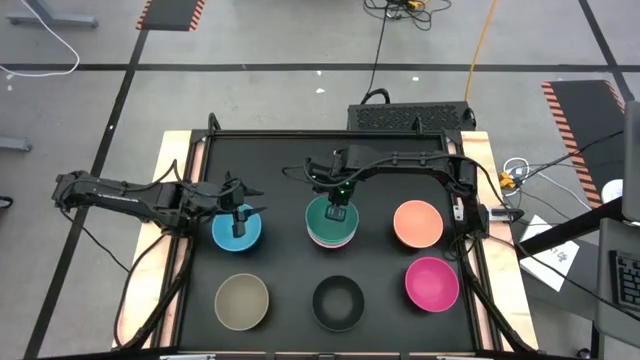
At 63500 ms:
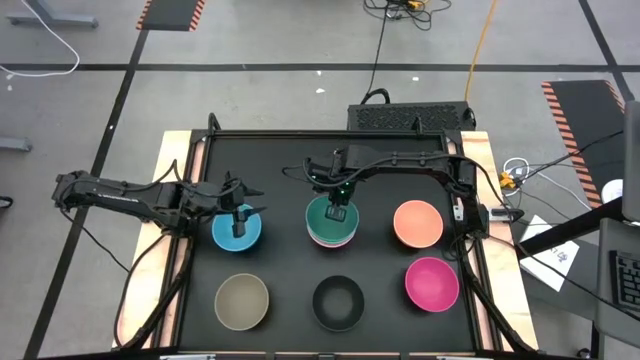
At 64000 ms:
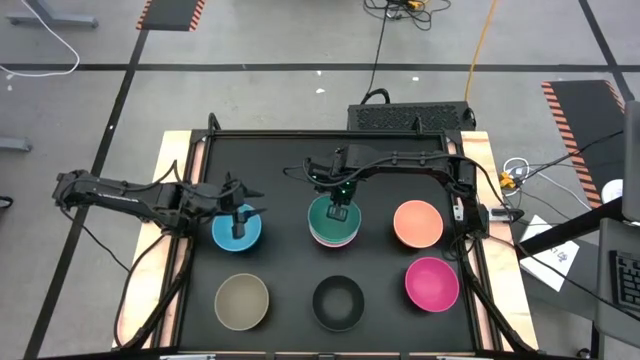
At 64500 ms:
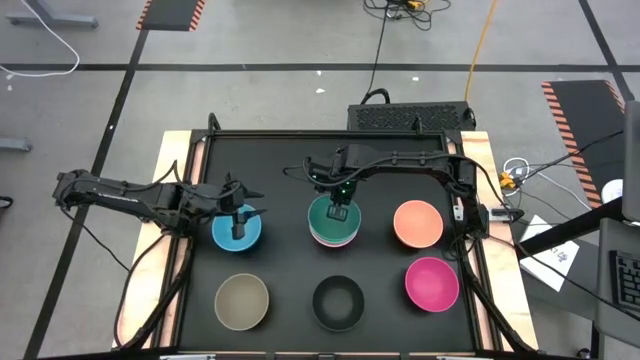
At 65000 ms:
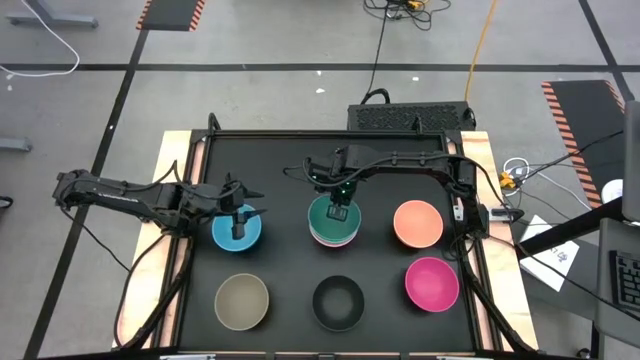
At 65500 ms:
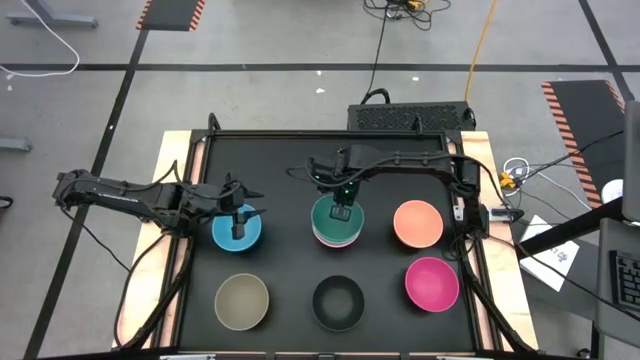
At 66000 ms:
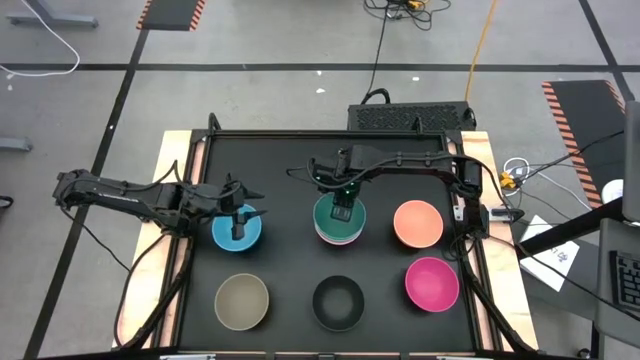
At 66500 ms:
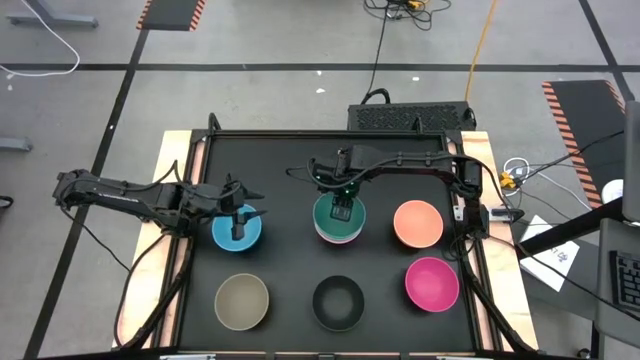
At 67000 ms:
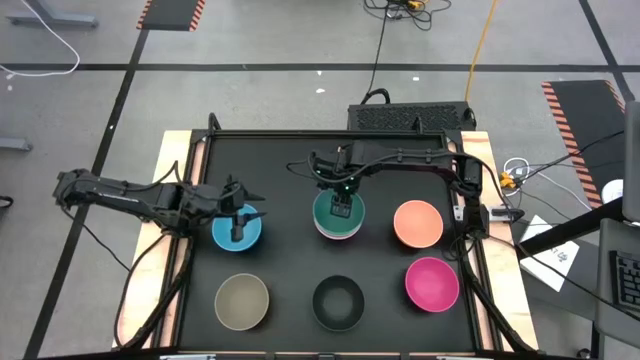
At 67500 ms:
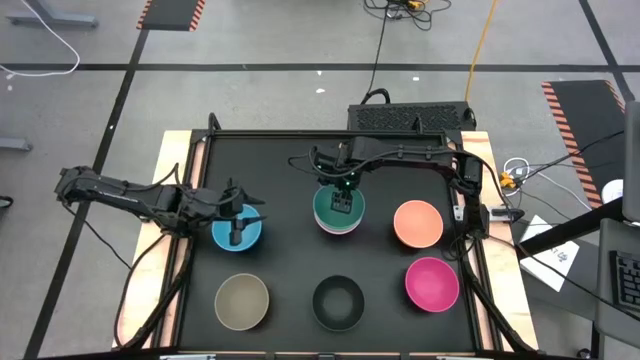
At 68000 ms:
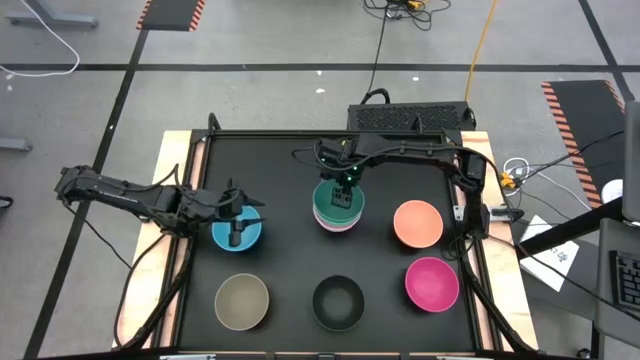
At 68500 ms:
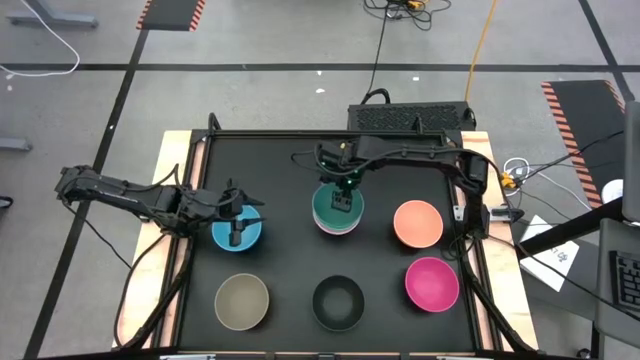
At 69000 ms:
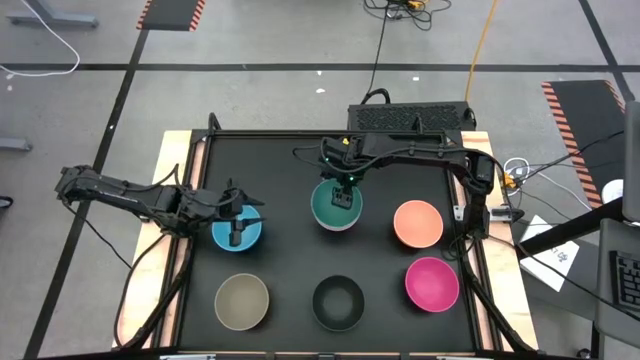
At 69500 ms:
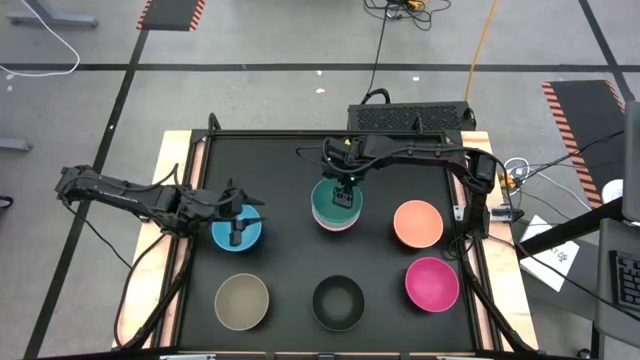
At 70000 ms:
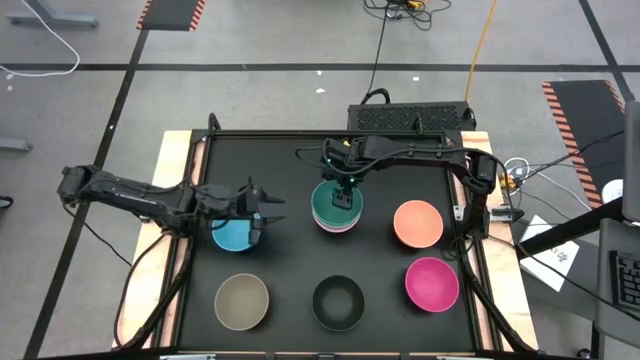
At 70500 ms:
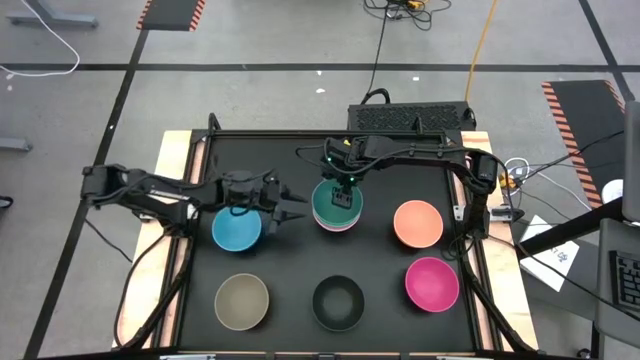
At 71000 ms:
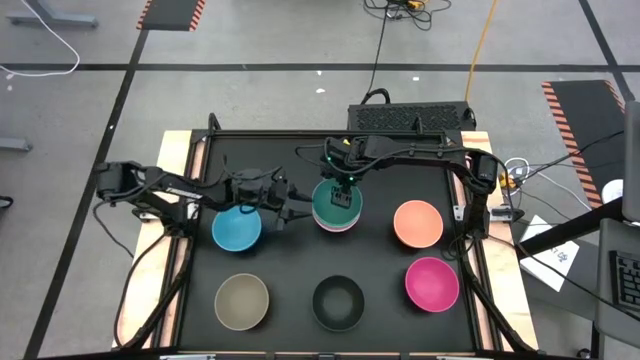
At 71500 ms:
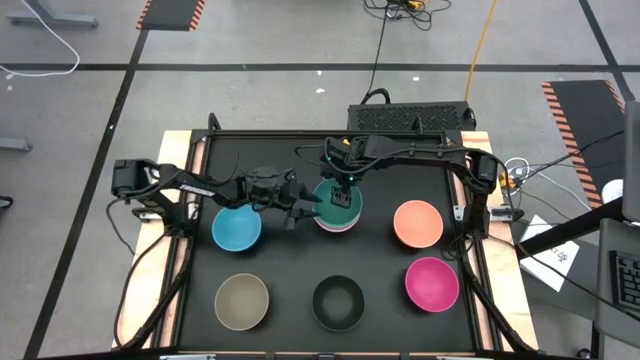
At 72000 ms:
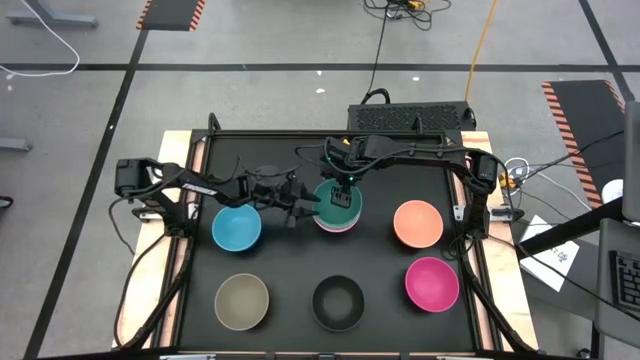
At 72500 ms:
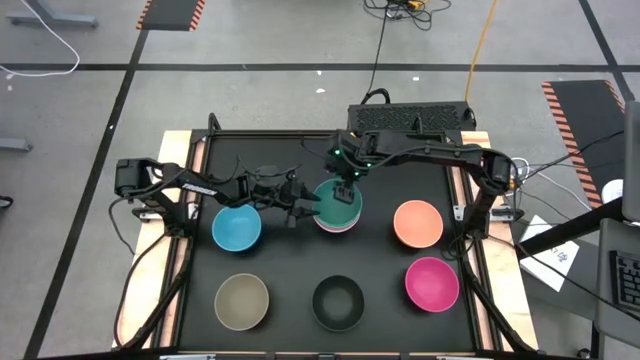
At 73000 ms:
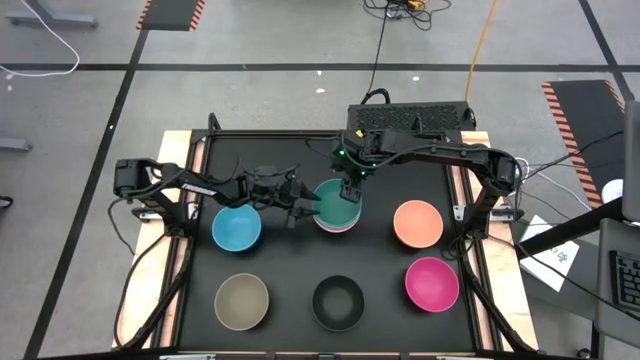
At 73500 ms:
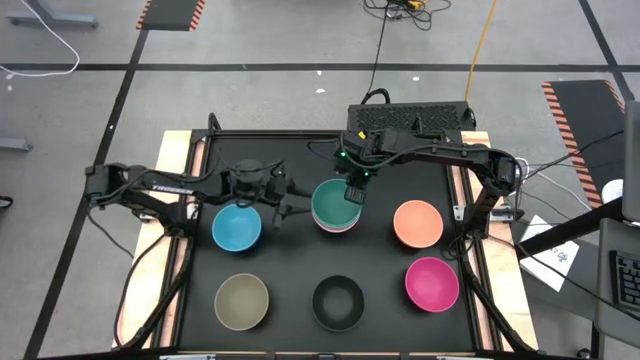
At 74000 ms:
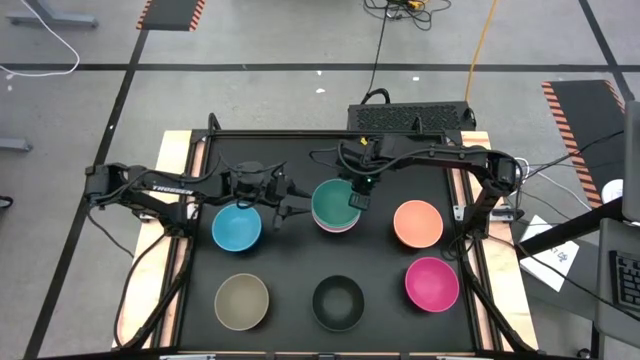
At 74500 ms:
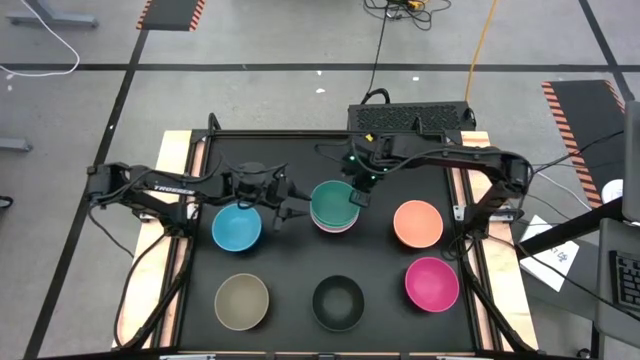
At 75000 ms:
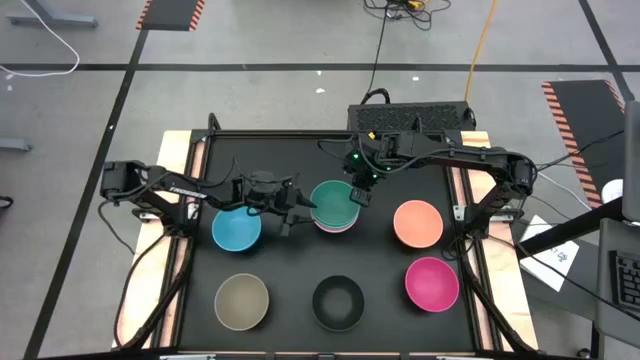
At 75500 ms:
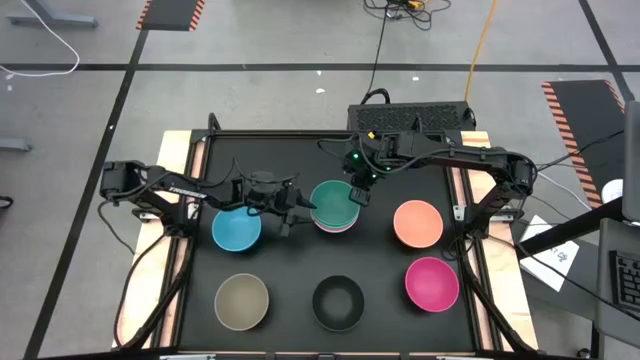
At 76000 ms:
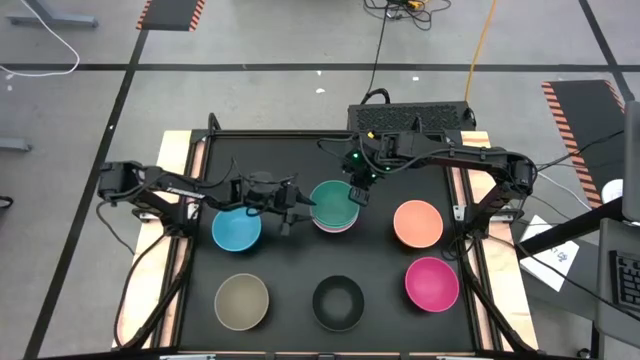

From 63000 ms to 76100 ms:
Task: Nest bowls inside each other
Stack the green bowl on top of the light blue bowl

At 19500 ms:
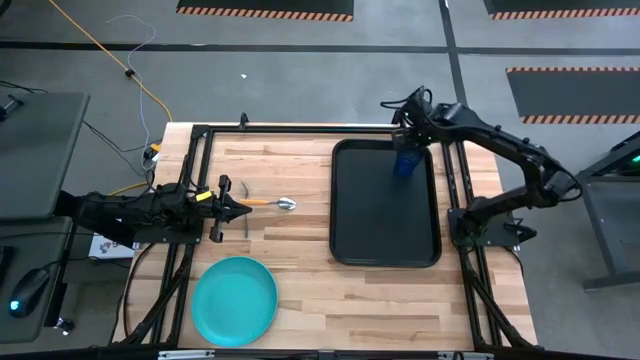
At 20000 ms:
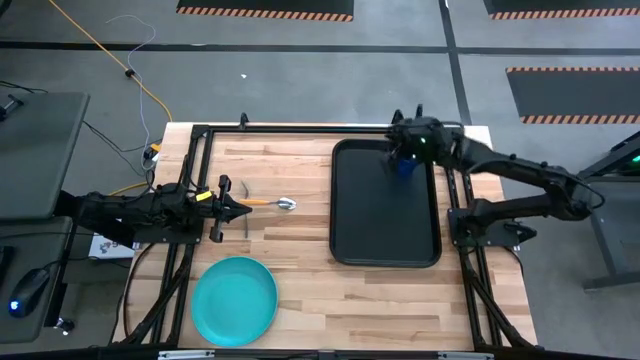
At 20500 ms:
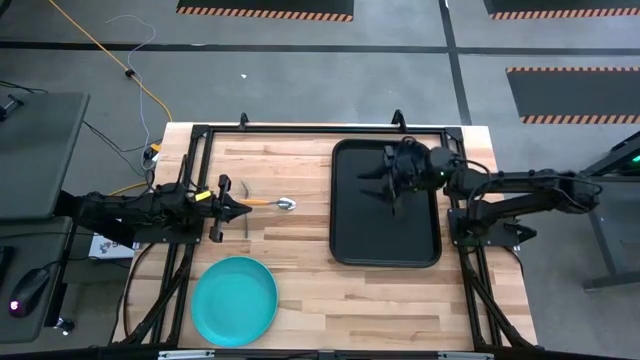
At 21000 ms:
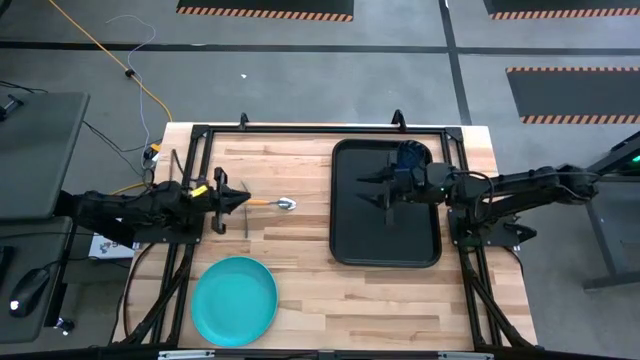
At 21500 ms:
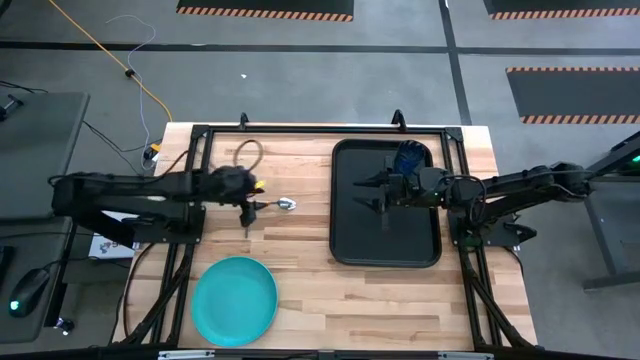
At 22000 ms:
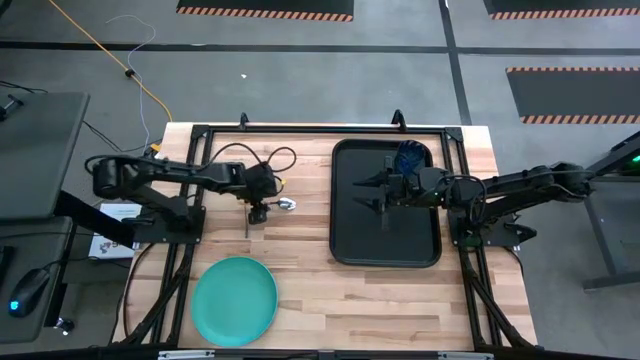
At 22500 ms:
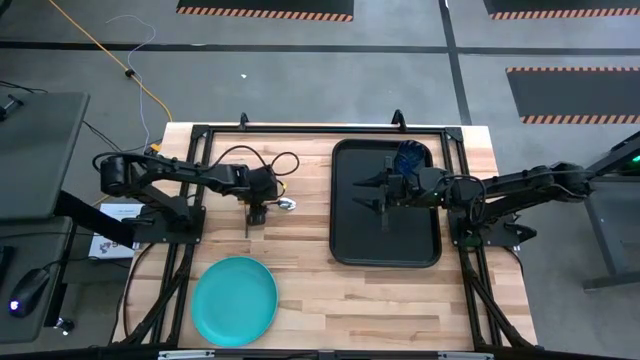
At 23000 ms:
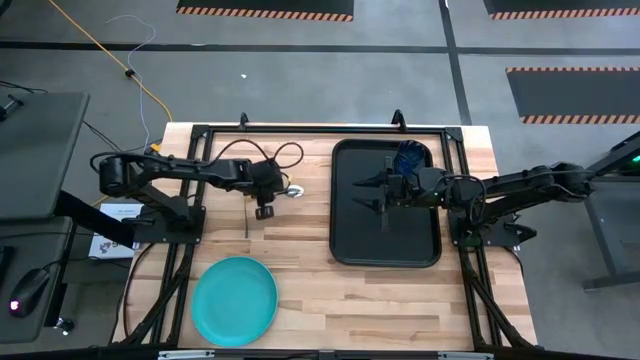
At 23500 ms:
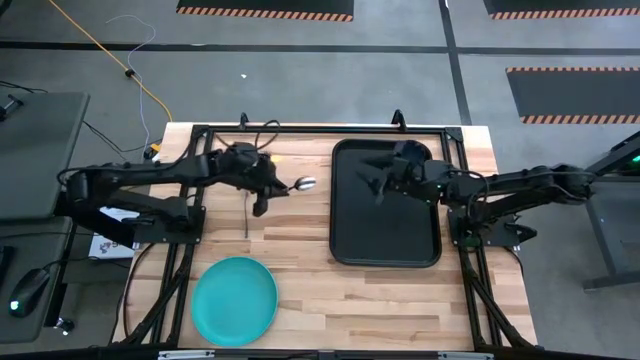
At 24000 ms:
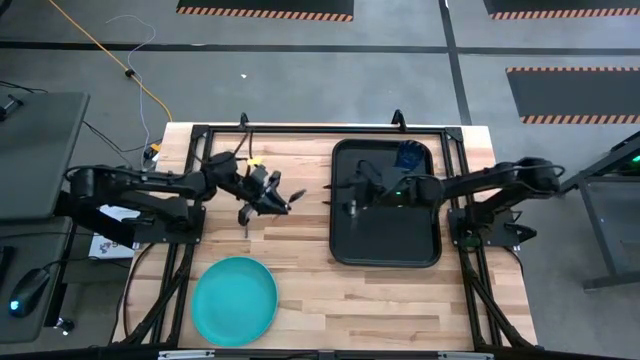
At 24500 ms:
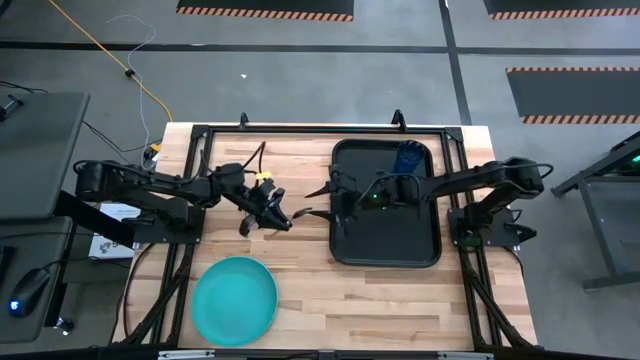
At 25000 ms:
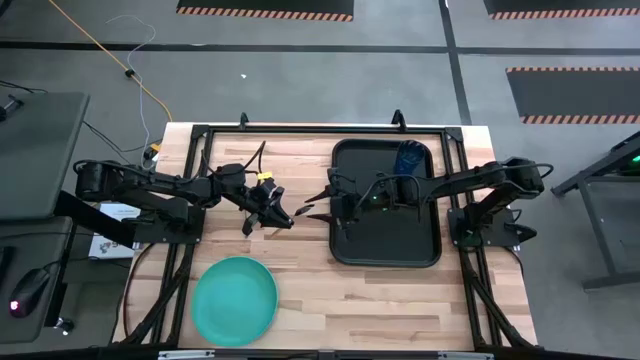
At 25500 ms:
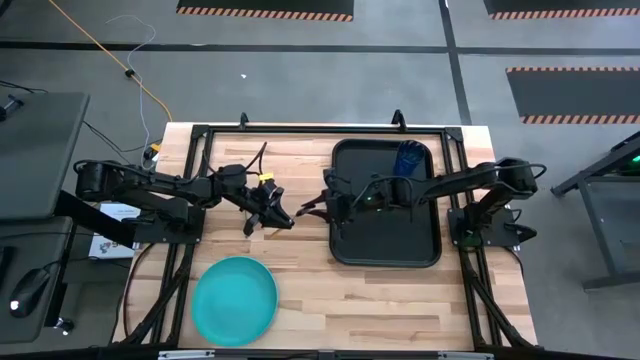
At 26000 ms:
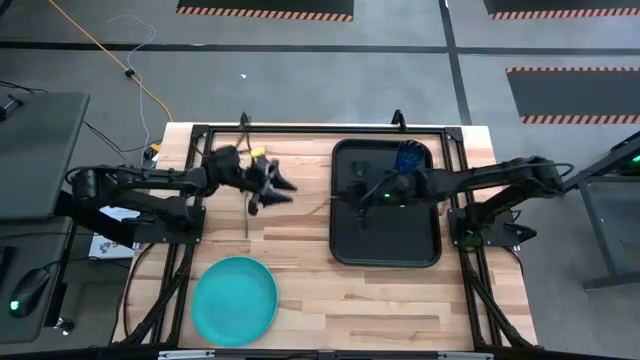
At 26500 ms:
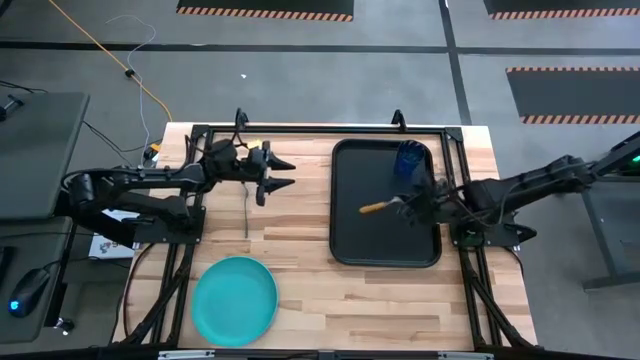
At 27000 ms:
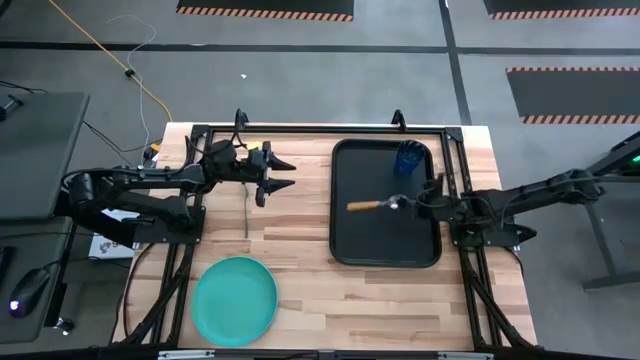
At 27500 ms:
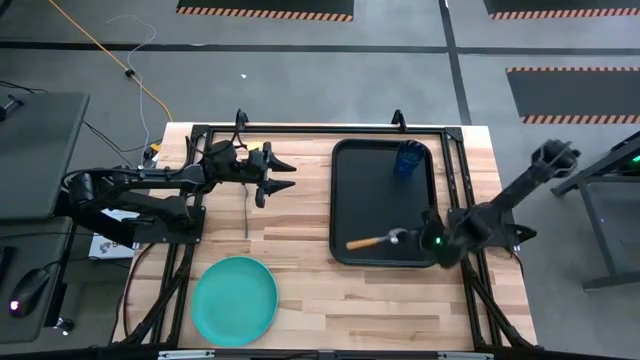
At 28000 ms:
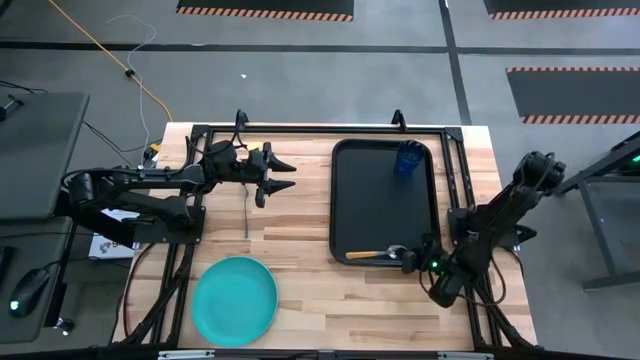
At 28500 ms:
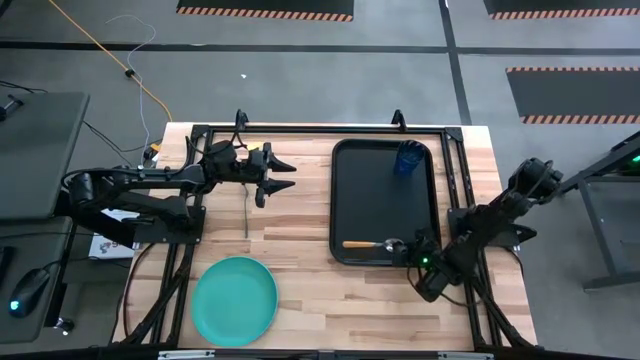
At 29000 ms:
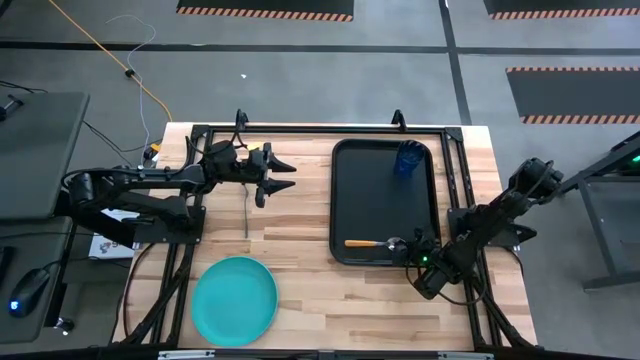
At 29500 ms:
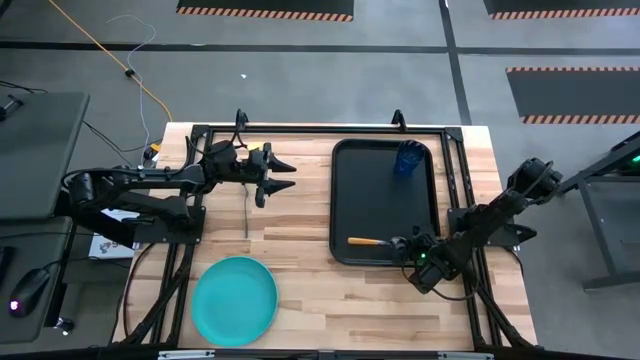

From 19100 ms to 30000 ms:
Task: Pick and place plate/cup/fork/spoon on tray
Put the yellow spoon at the bottom of the black serving tray
